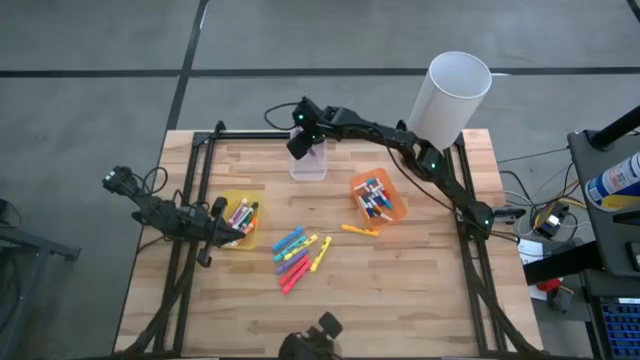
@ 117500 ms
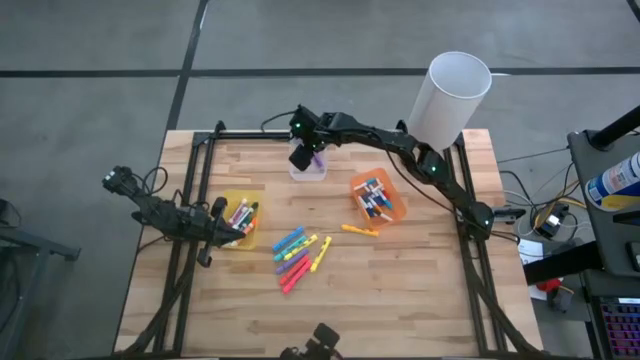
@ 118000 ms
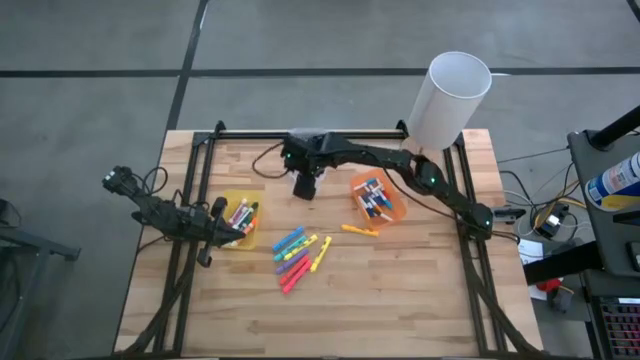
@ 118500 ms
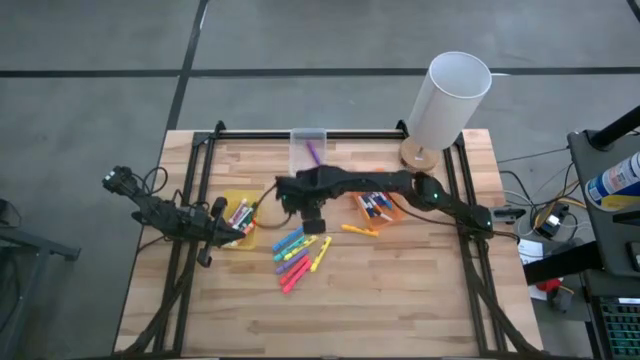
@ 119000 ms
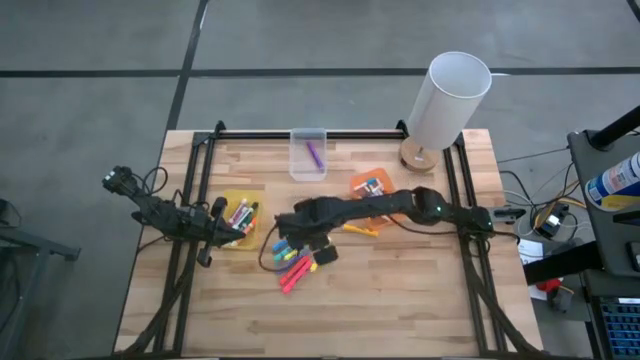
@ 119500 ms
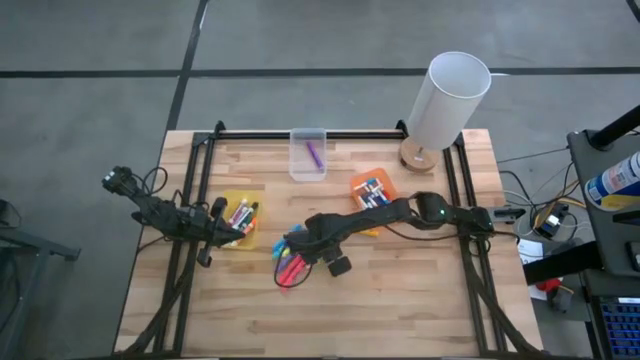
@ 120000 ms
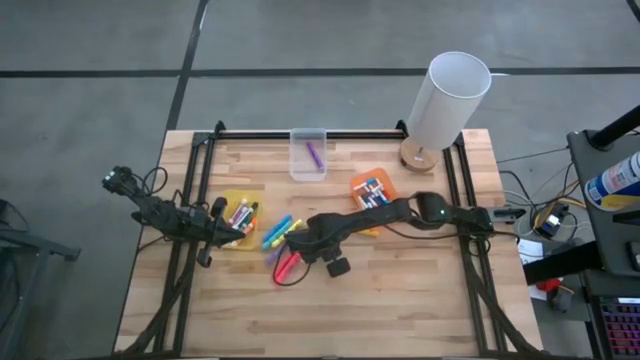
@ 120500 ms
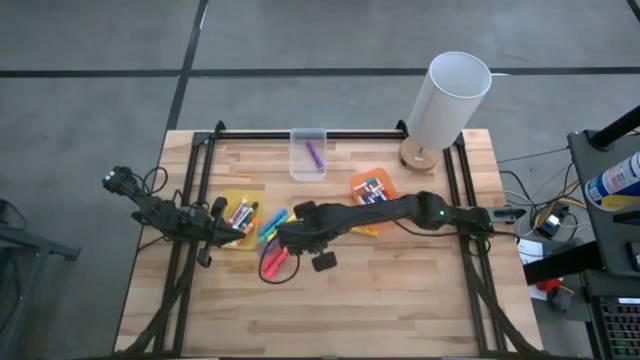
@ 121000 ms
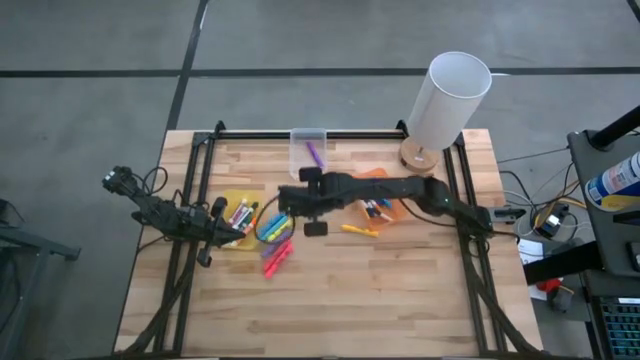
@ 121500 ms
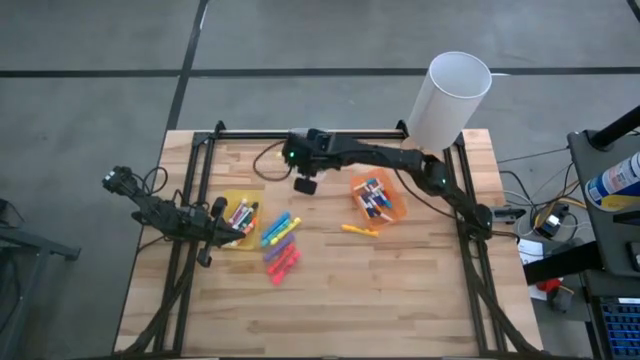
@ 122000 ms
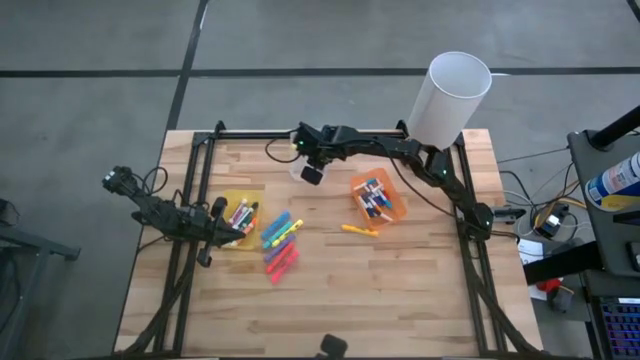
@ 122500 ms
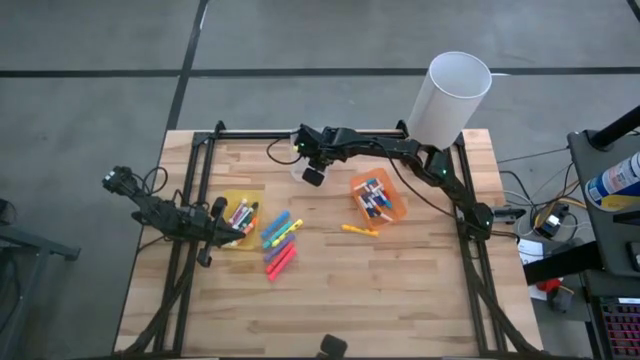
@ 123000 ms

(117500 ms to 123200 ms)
Task: Pick & Place Markers
Put the right light yellow highlighter into the transparent bin

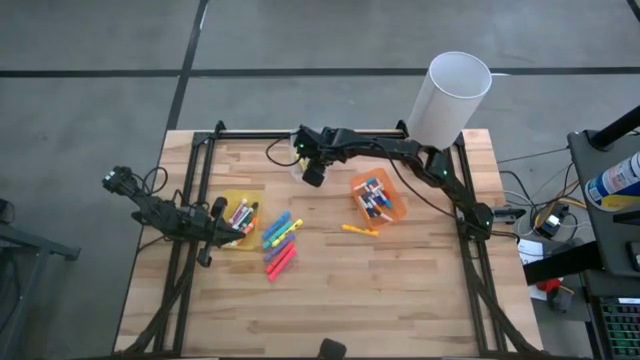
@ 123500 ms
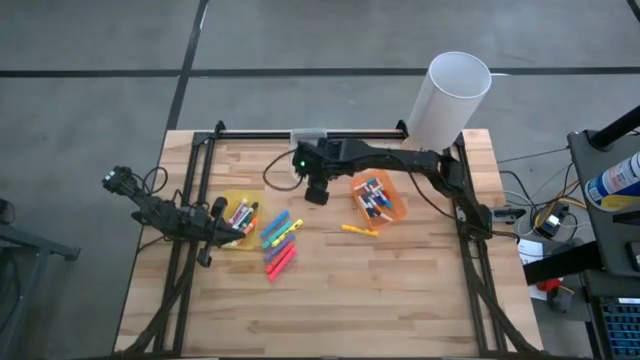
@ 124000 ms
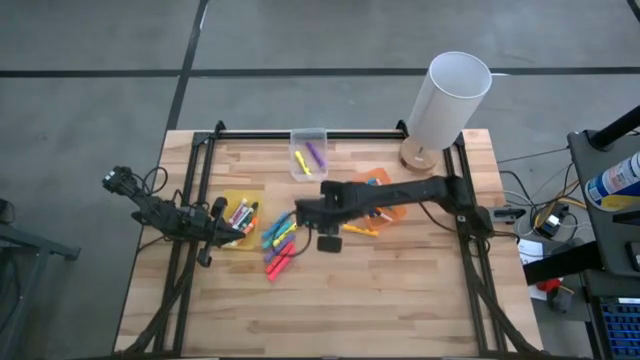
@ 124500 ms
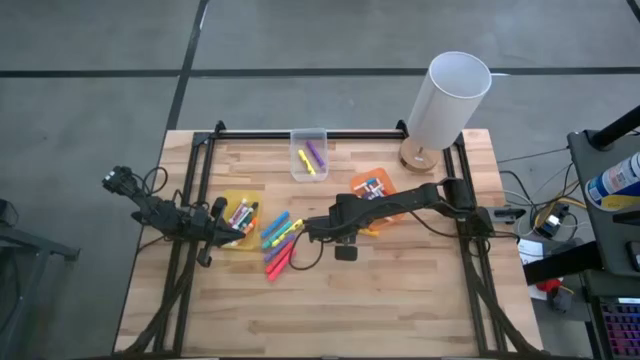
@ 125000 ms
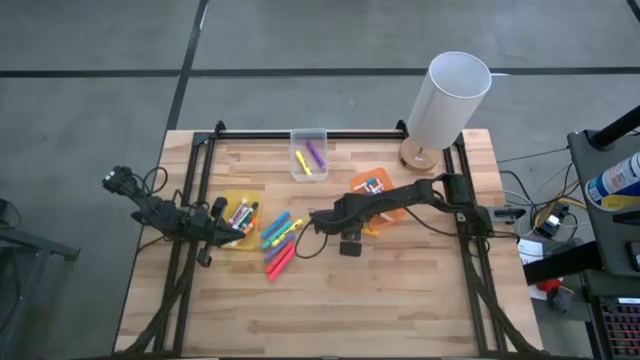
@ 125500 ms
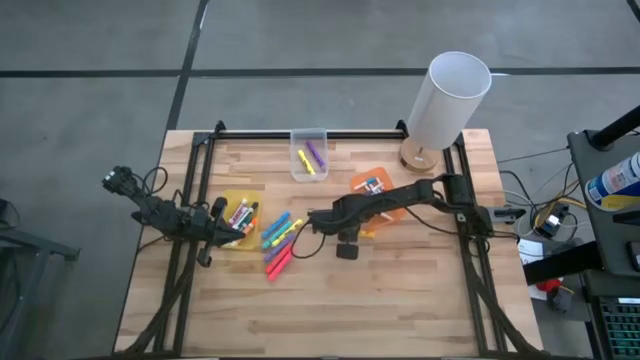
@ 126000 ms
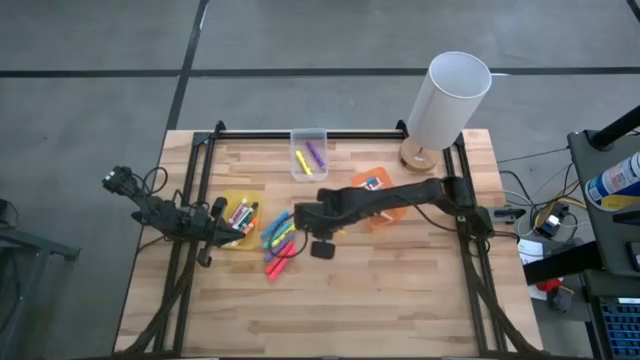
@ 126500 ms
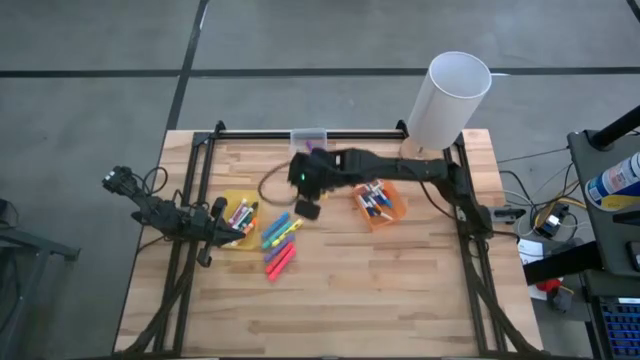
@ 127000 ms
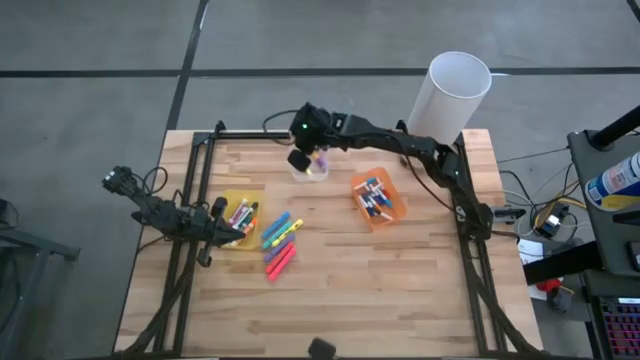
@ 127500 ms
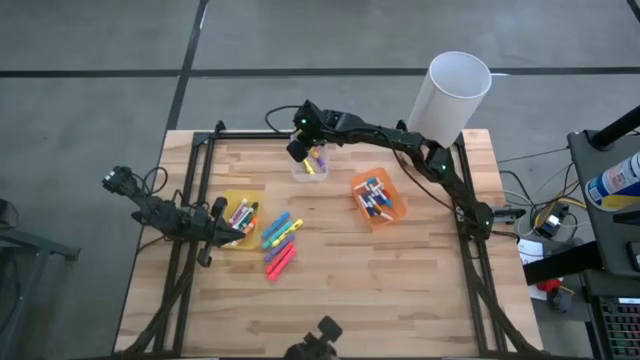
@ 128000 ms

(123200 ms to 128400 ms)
Put the yellow highlighter into the transparent bin

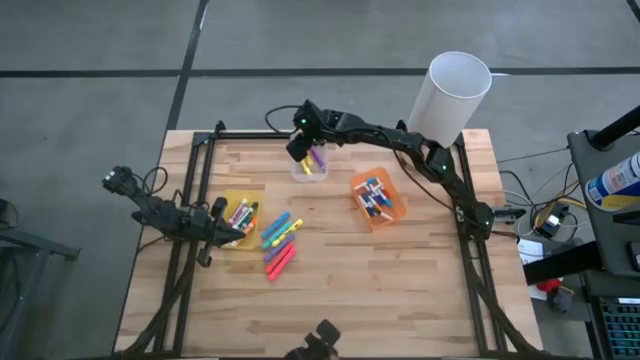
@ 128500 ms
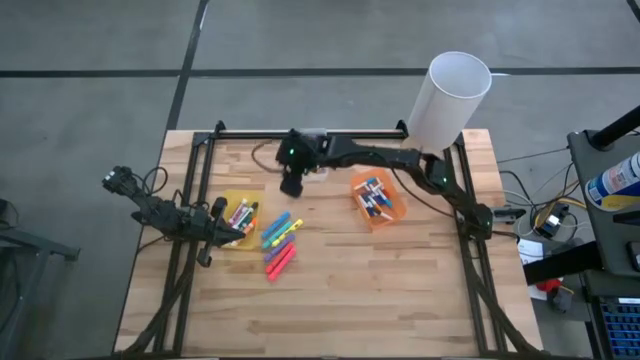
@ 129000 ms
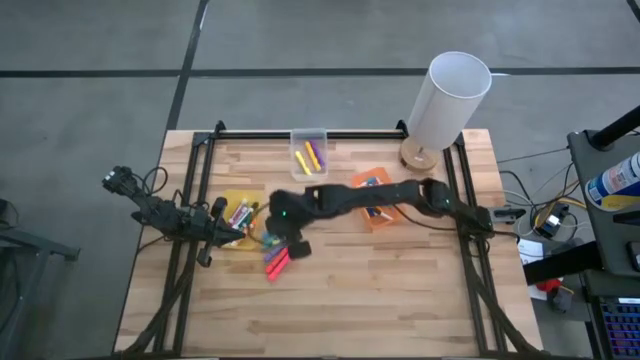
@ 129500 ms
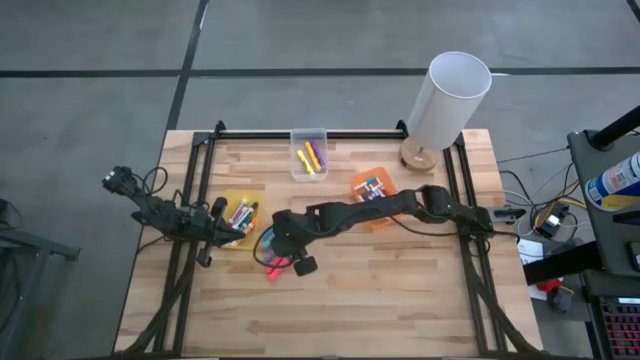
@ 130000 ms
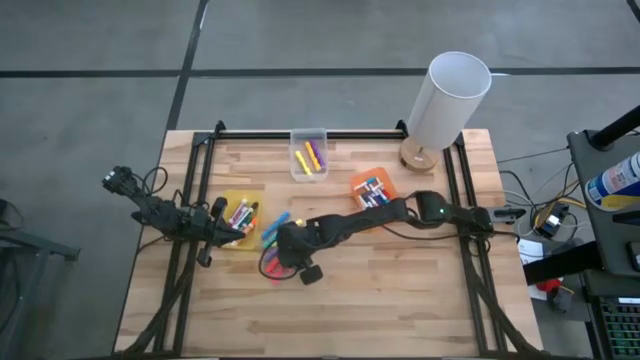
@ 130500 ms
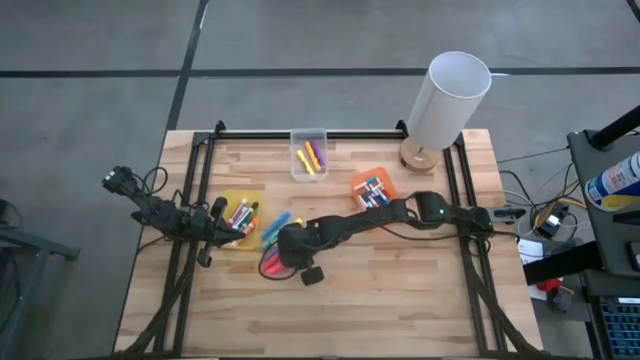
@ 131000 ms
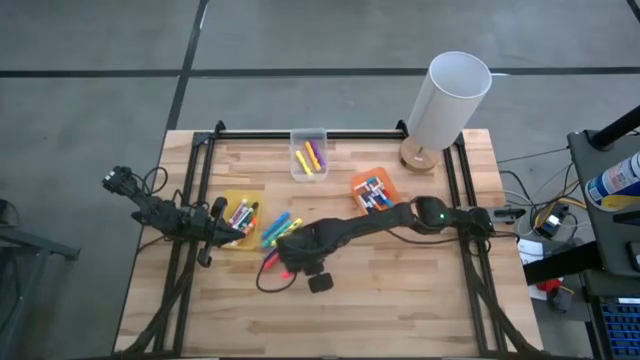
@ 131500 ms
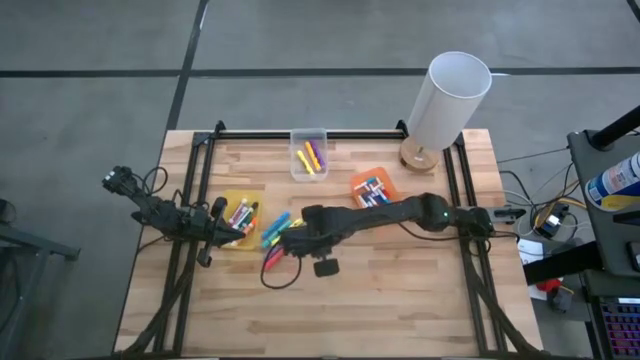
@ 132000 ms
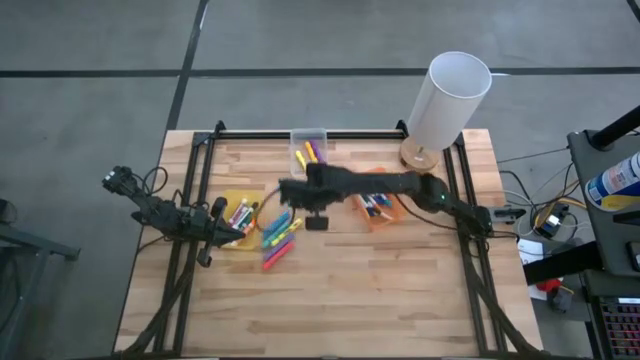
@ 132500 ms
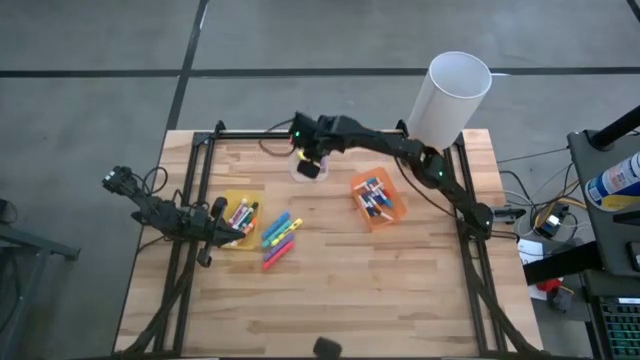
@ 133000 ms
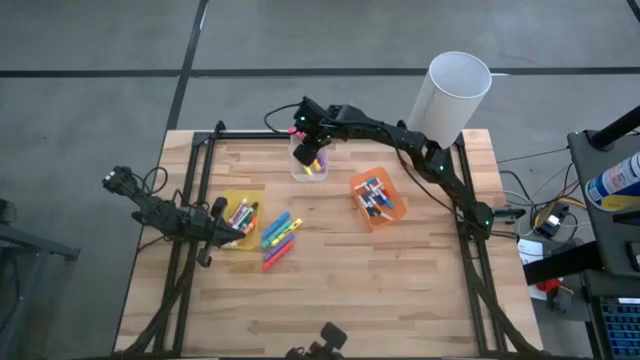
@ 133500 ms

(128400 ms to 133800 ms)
Put the pink highlighter into the transparent bin

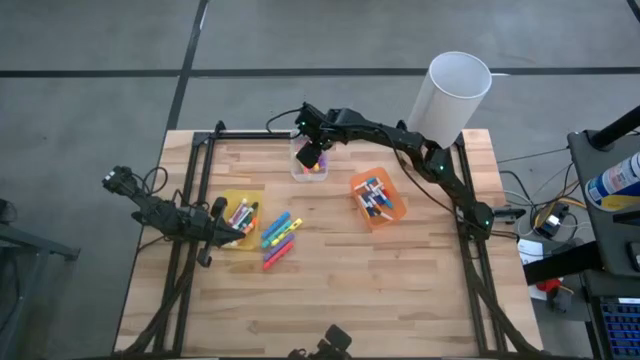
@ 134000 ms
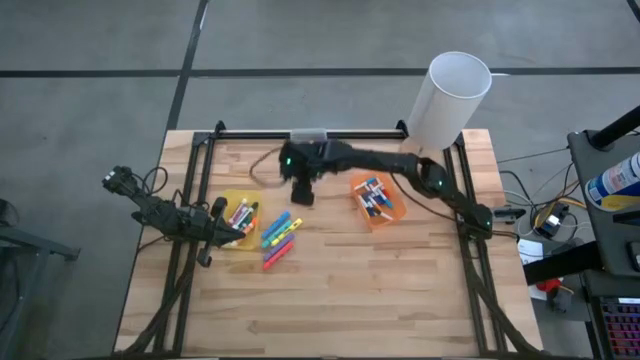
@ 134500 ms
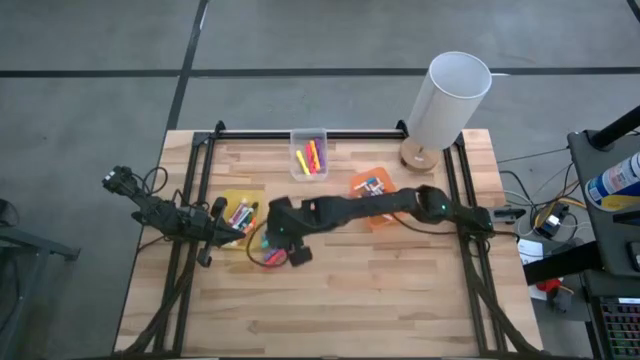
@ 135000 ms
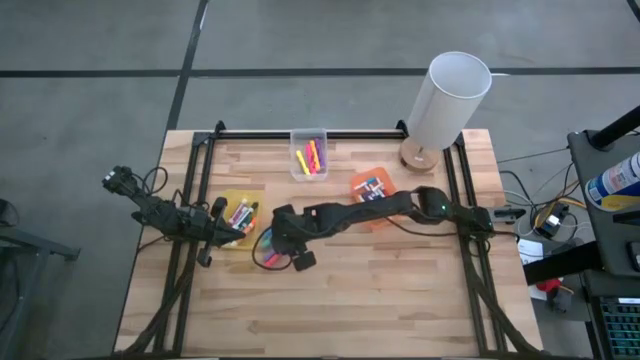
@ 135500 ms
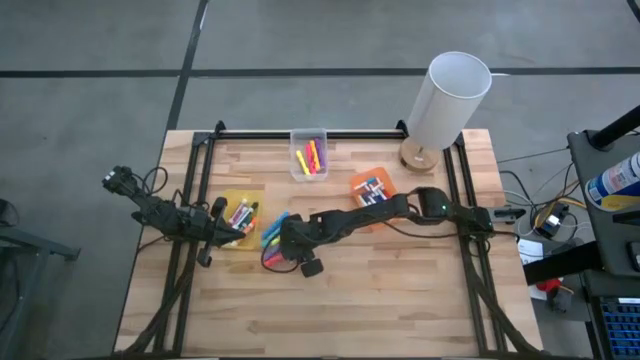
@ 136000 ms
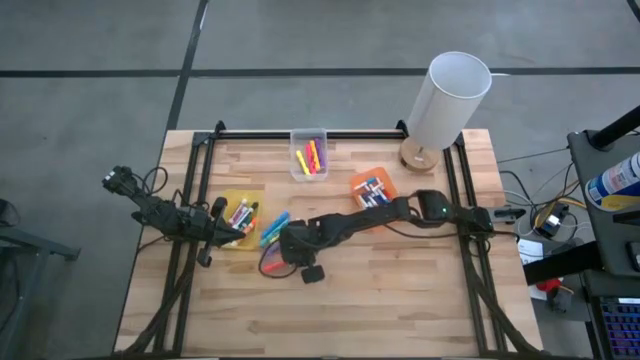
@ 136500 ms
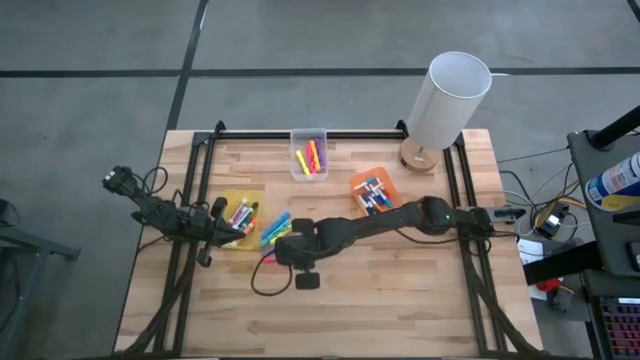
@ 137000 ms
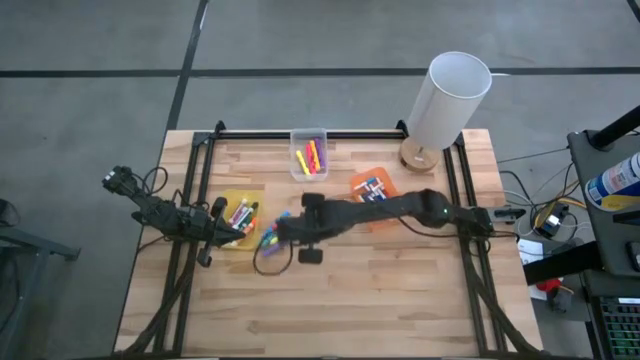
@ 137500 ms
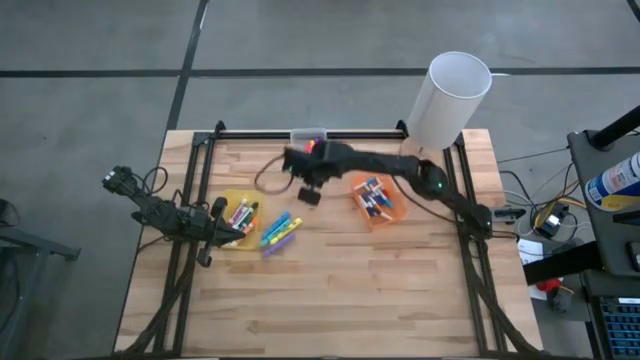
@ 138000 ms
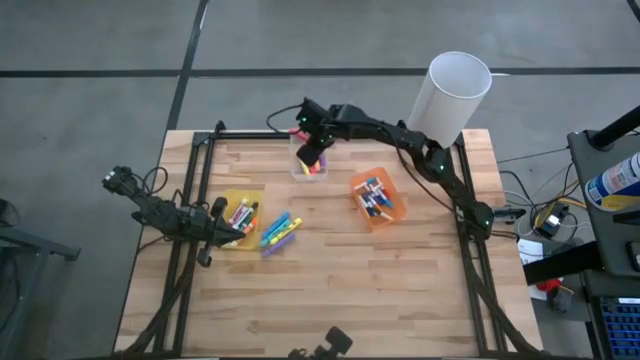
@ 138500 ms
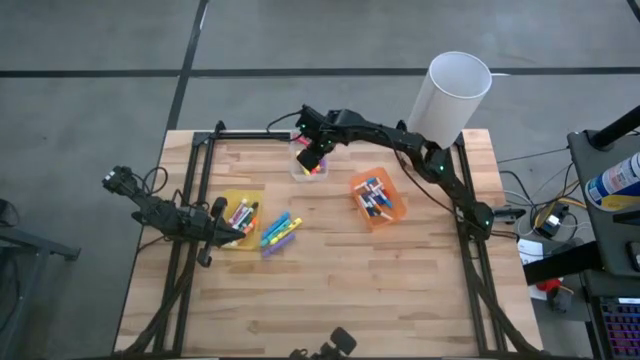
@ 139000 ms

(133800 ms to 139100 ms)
Put the red highlighter into the transparent bin
